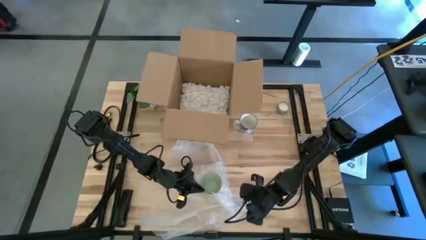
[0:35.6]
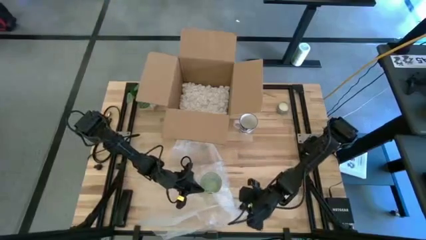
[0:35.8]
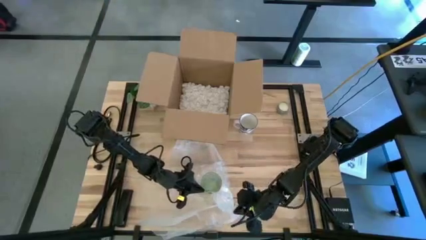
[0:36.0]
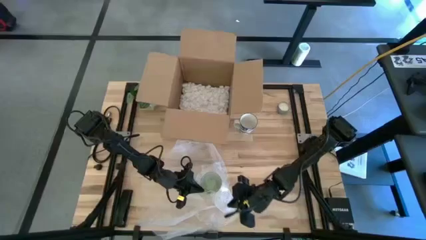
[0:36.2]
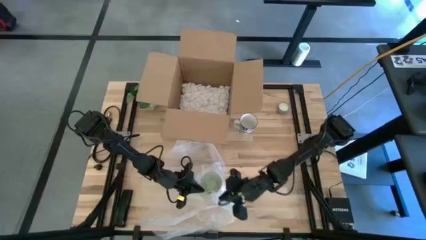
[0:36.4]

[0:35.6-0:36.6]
Task: wrap mug
Wrap the green mug with the bubble wrap

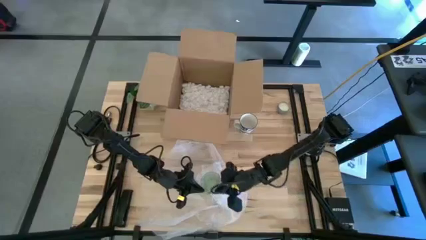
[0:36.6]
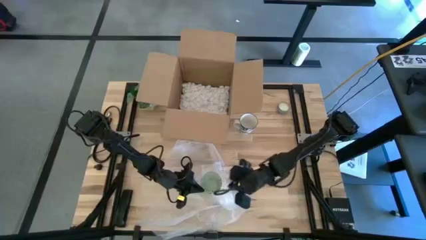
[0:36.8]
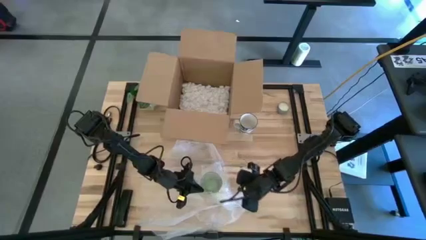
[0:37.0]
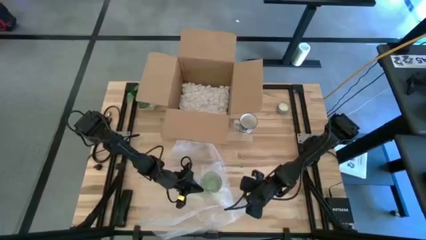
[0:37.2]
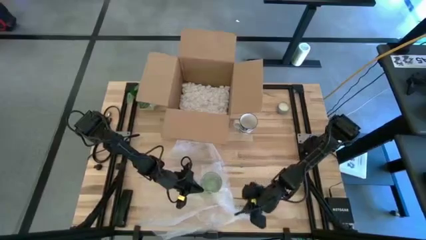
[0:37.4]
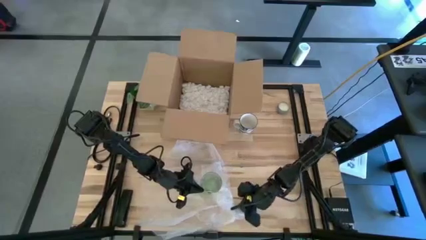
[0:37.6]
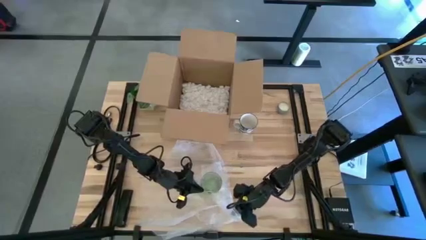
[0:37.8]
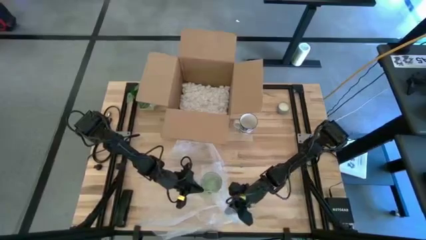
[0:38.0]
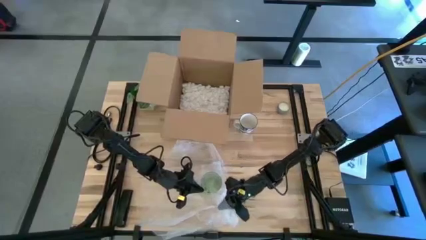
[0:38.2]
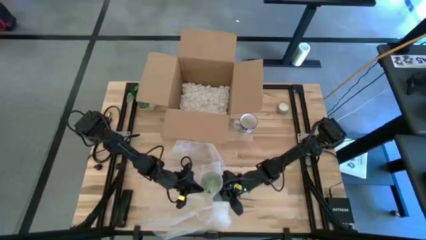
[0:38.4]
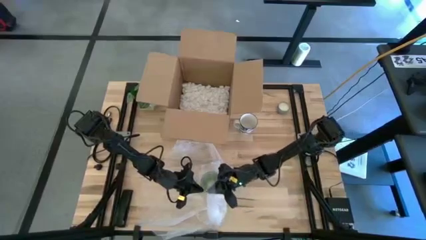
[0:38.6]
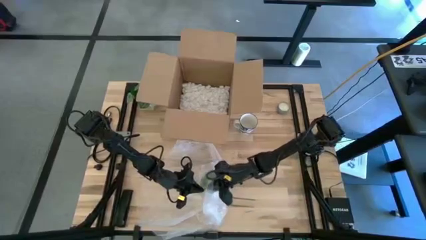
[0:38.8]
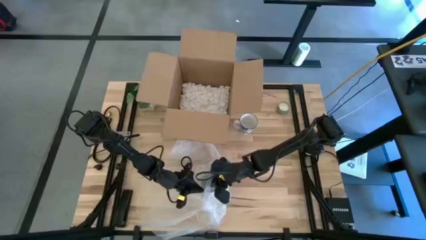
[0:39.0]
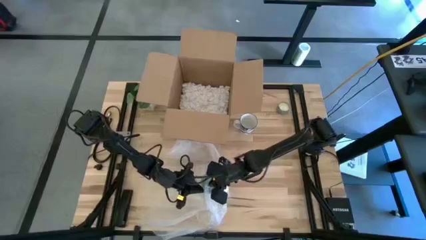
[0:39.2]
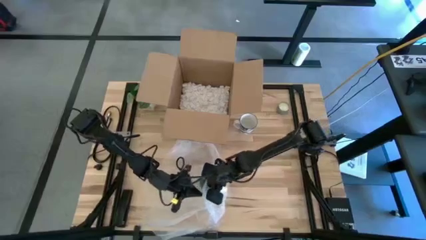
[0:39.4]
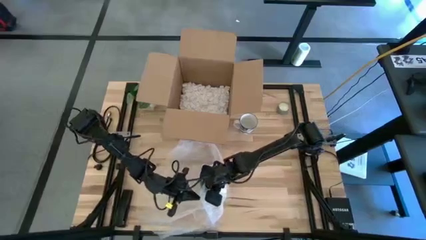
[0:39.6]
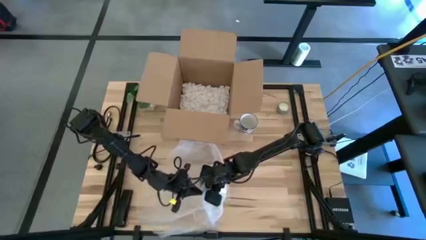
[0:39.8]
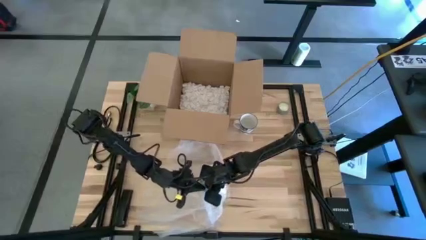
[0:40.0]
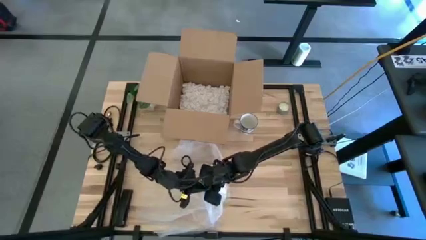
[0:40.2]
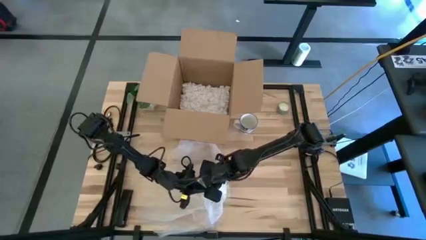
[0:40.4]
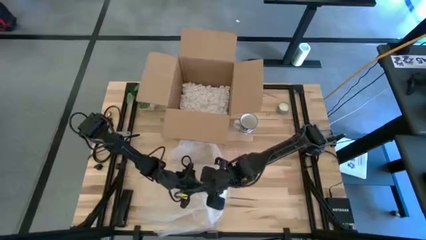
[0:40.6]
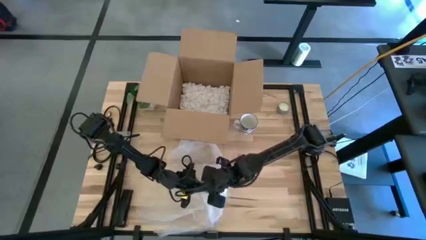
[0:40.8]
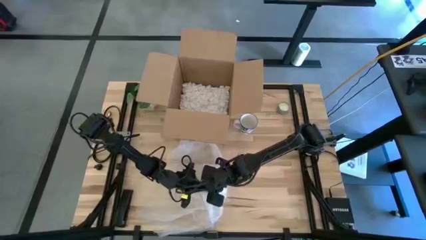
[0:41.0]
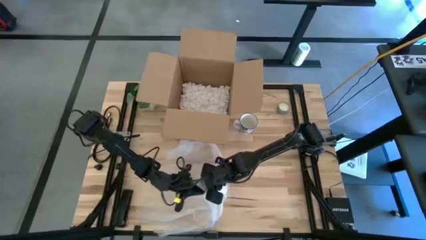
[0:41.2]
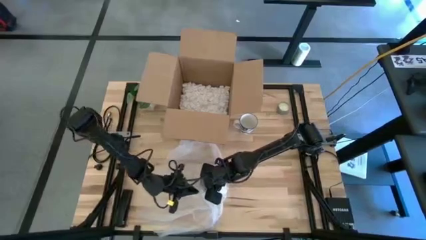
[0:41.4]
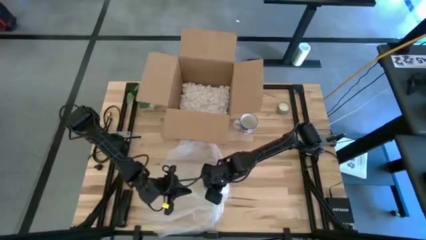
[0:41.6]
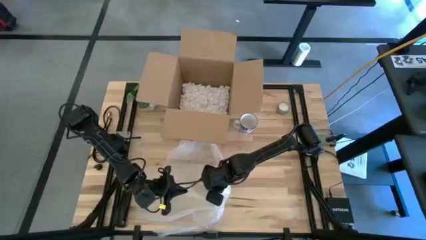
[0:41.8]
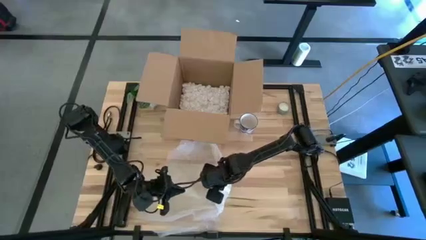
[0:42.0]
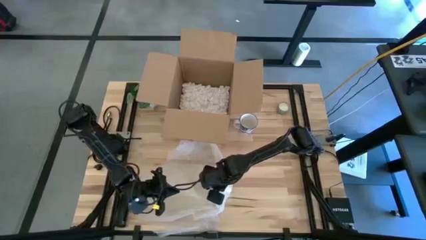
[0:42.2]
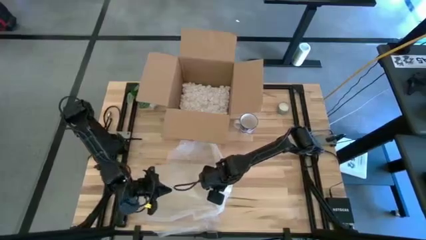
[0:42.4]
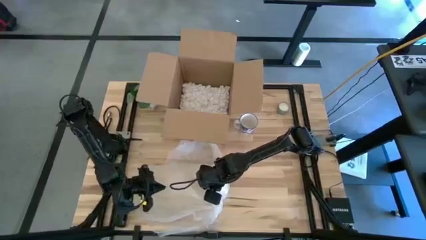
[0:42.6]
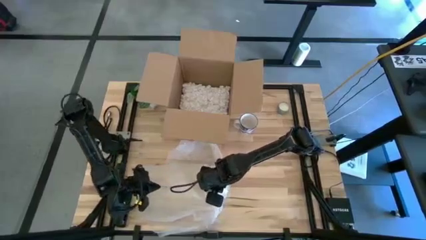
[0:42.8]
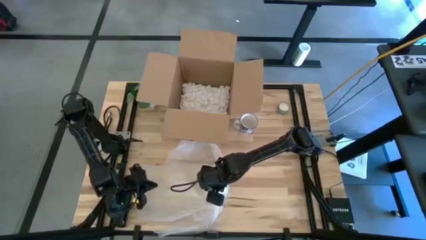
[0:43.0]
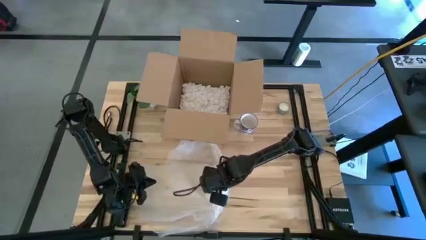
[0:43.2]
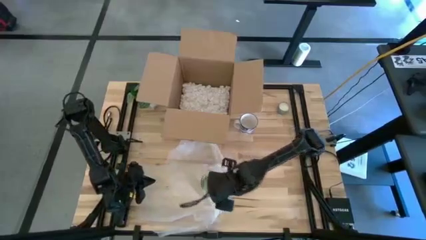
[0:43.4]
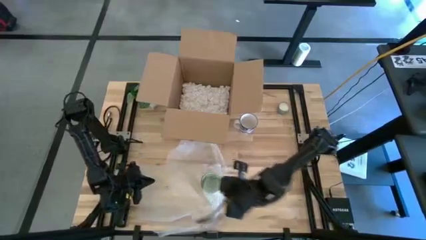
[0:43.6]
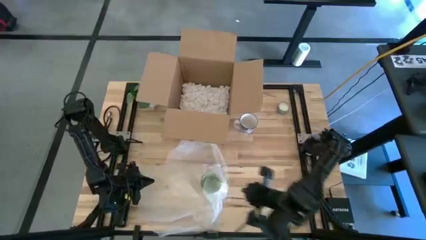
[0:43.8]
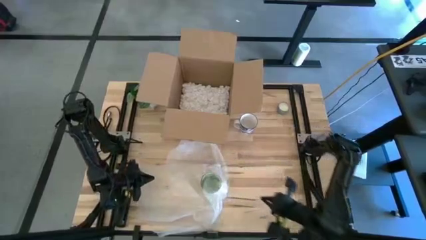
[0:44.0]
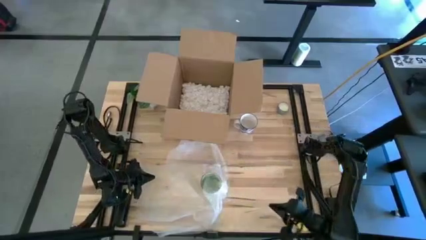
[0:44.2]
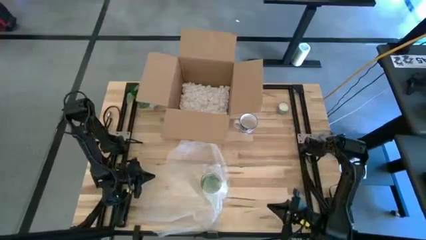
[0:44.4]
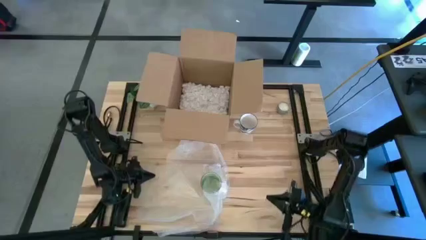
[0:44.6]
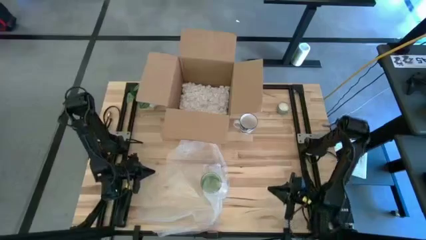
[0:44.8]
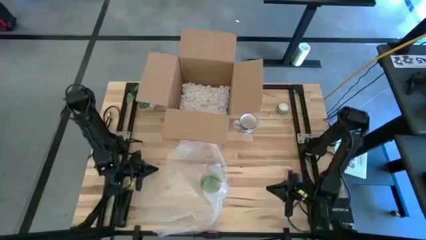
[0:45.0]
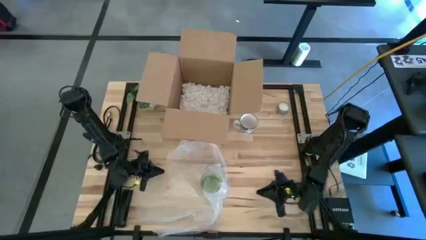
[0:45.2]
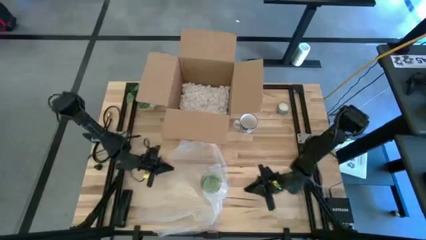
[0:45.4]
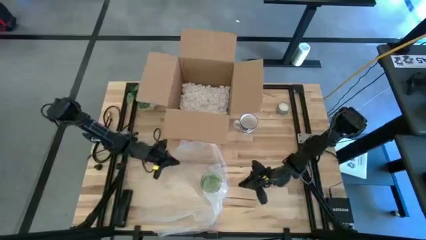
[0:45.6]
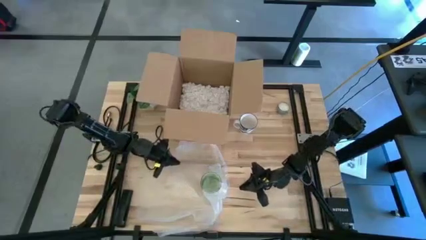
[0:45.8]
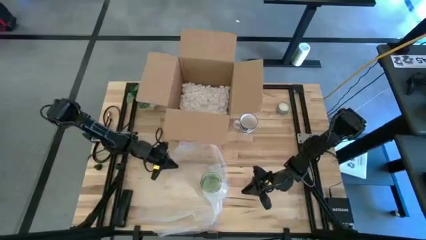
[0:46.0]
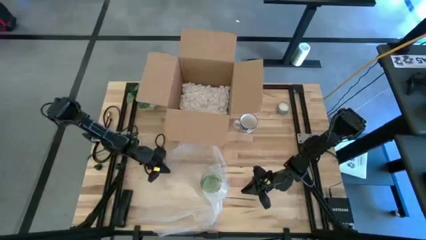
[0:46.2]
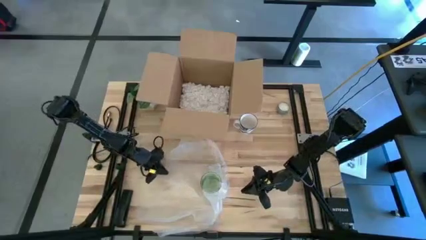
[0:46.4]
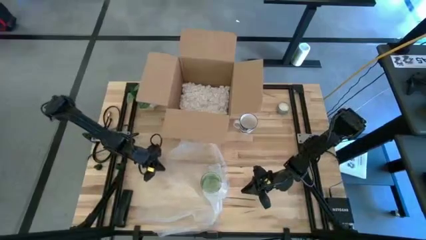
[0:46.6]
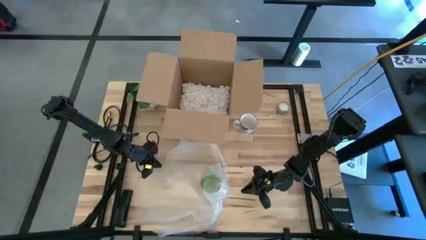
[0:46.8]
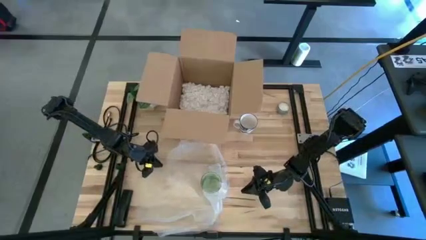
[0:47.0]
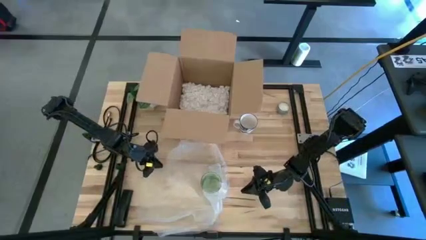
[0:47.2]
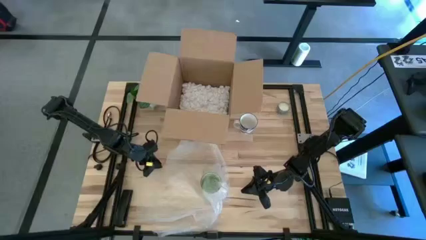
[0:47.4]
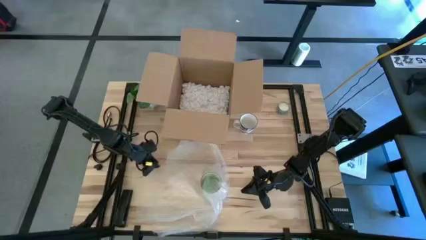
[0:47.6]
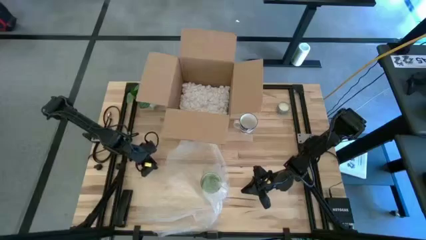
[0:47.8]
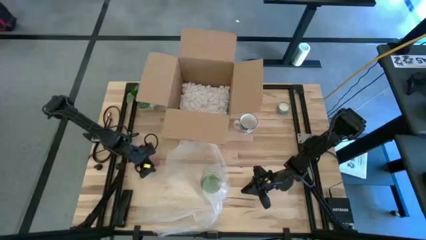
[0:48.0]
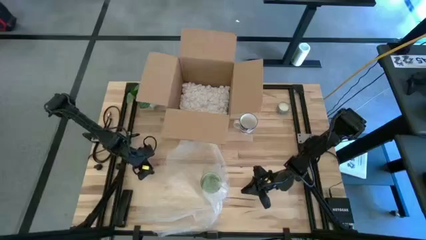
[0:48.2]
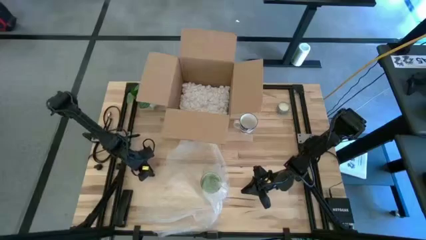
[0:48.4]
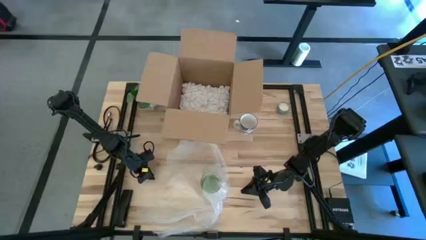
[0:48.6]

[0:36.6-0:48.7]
Wrap the green mug with the bubble wrap

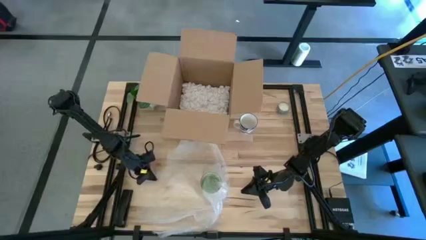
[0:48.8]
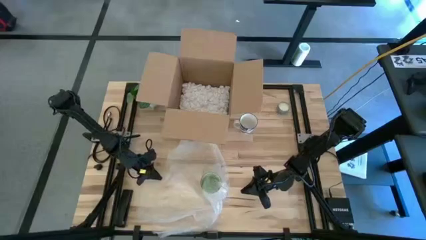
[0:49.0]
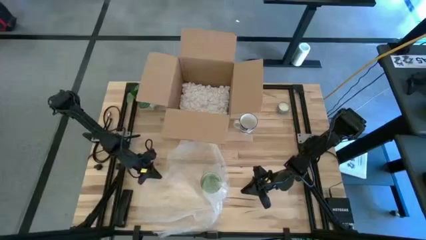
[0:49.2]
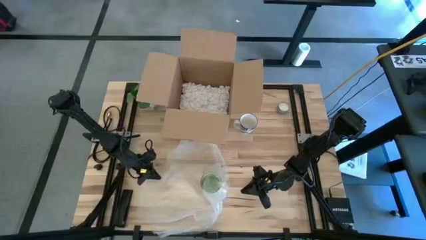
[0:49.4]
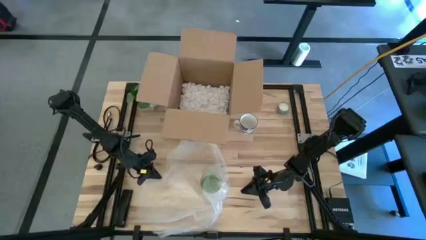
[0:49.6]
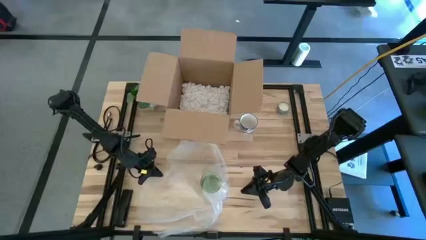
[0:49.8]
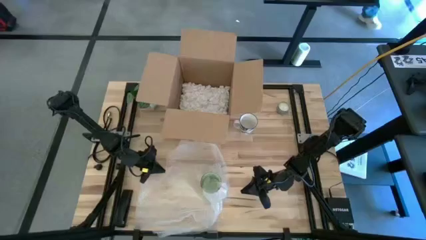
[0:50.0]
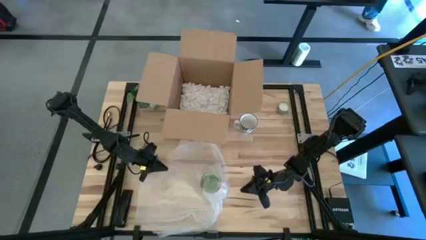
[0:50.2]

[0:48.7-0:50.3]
Wrap the green mug with the bubble wrap

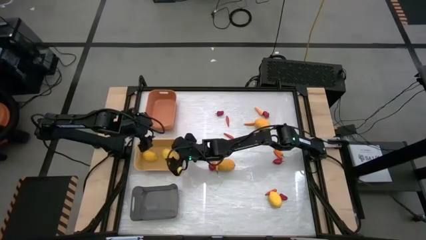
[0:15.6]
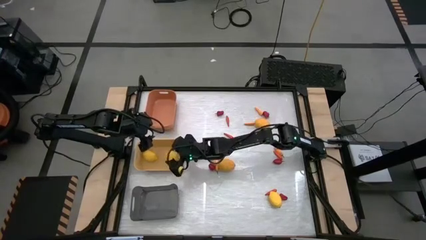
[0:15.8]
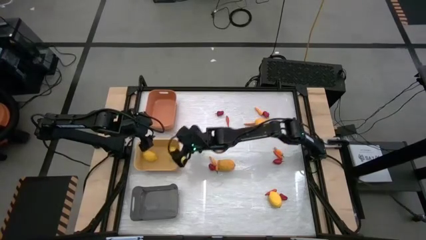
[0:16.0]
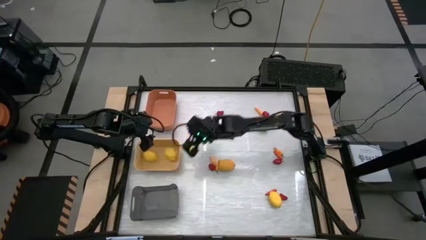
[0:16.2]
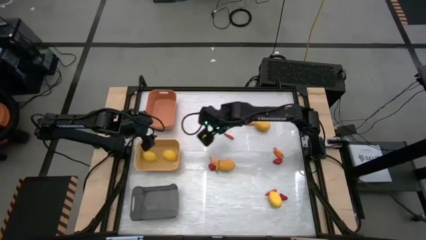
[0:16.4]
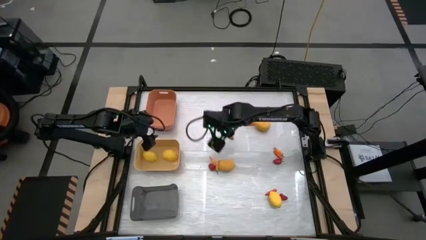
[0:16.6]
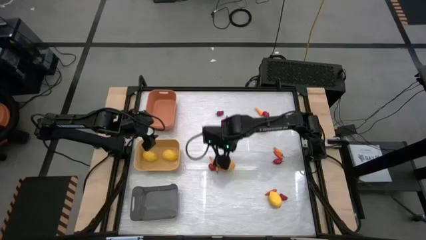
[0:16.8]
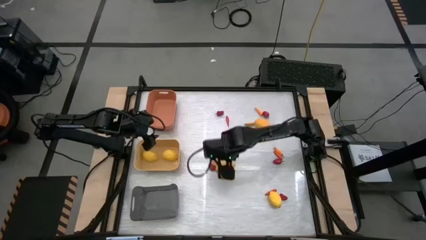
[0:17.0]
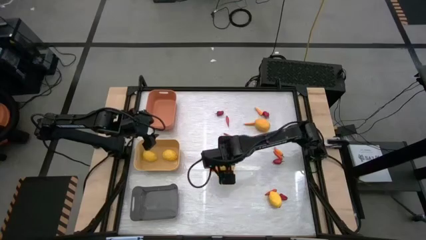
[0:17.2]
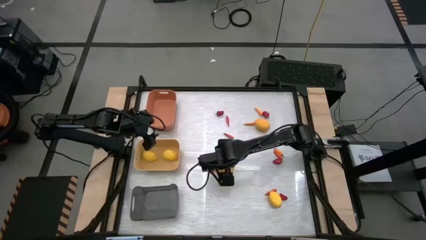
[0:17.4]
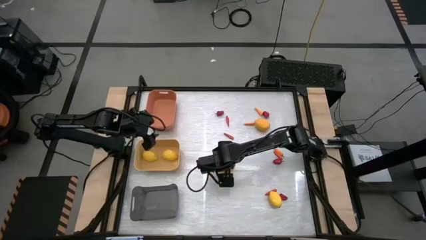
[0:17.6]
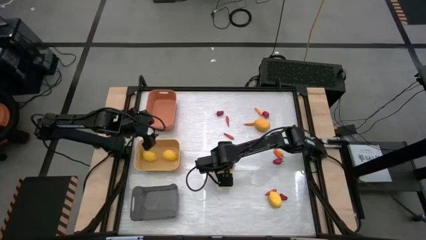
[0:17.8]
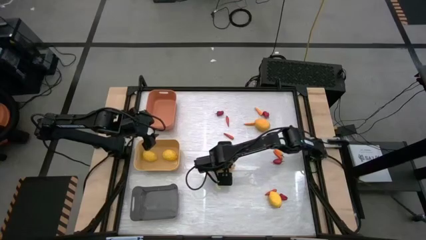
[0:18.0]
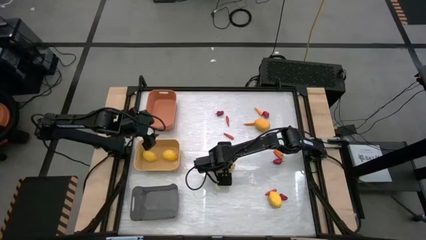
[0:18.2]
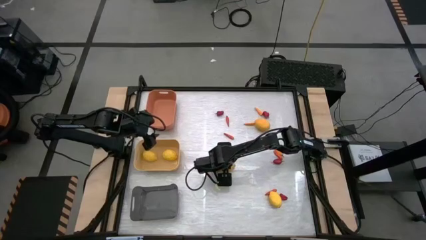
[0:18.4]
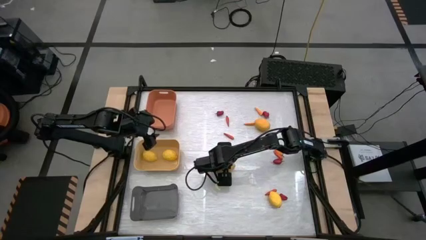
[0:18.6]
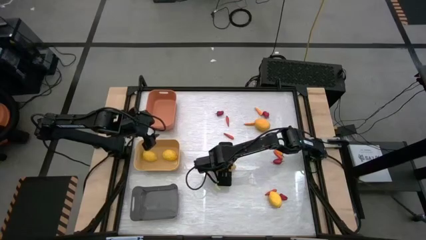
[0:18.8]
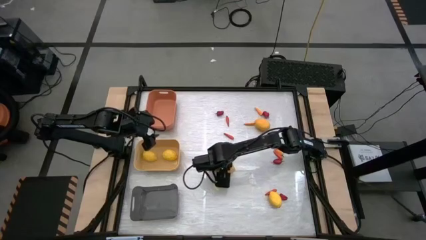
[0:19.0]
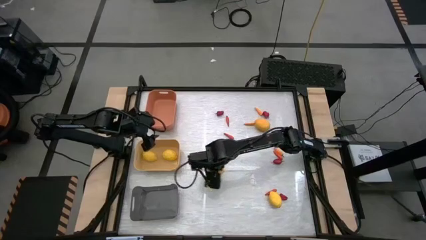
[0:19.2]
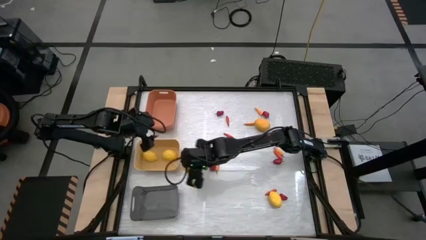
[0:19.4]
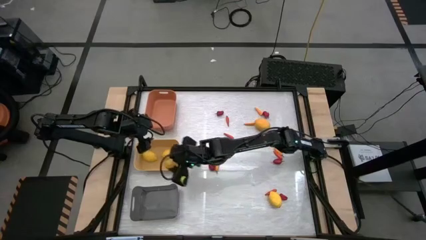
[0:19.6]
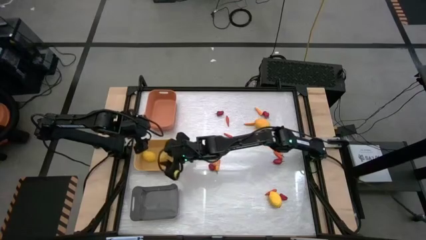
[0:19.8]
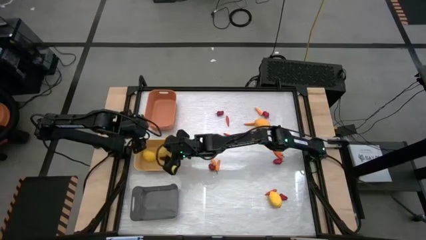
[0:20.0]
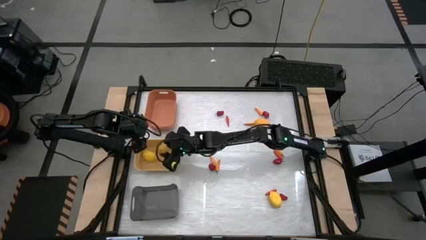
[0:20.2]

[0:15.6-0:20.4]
Task: Sort produce into baskets
Put the yellow lemon into the yellow bin
